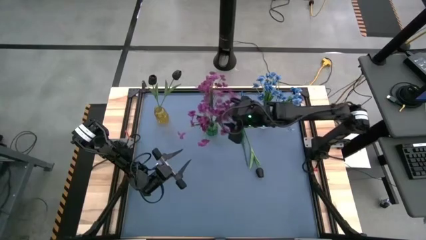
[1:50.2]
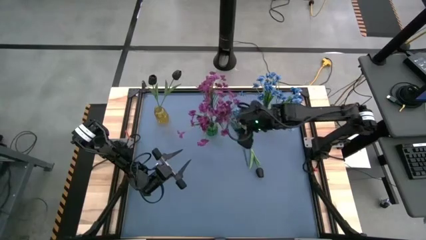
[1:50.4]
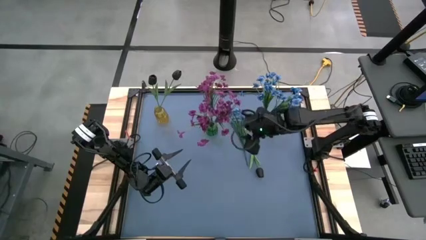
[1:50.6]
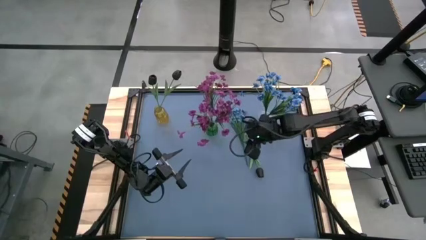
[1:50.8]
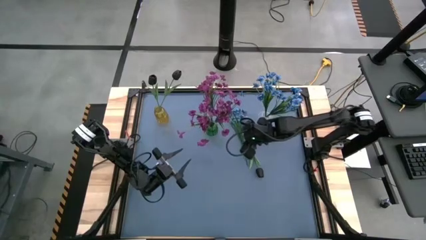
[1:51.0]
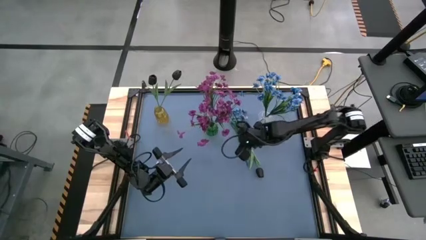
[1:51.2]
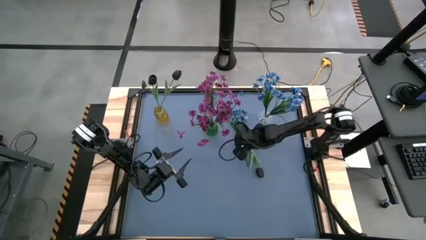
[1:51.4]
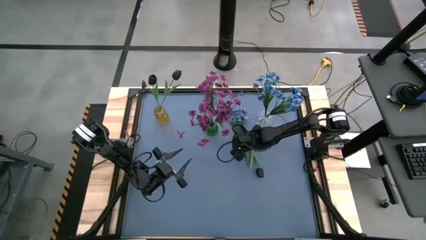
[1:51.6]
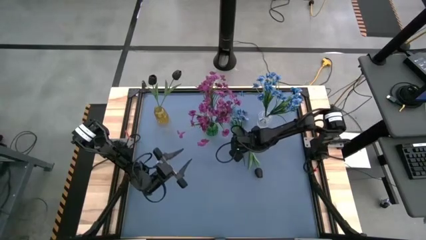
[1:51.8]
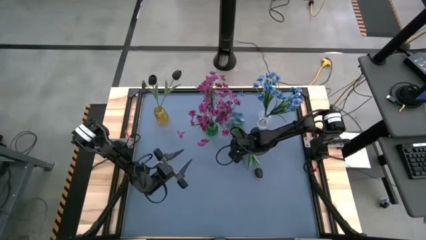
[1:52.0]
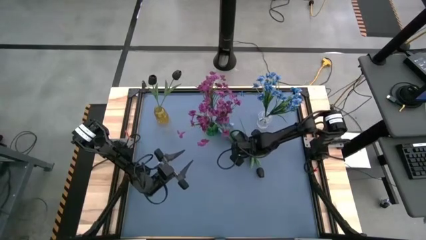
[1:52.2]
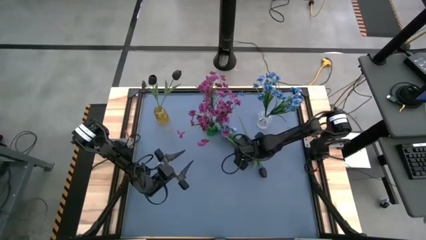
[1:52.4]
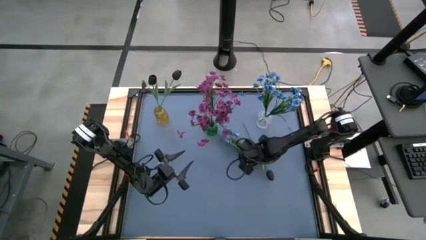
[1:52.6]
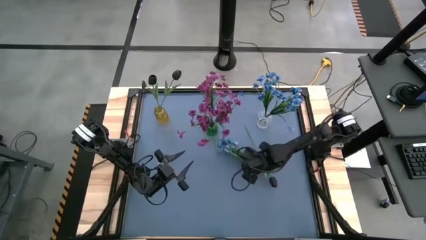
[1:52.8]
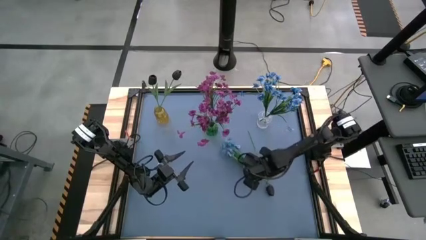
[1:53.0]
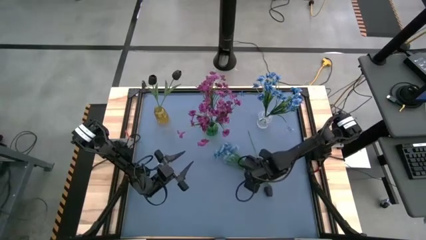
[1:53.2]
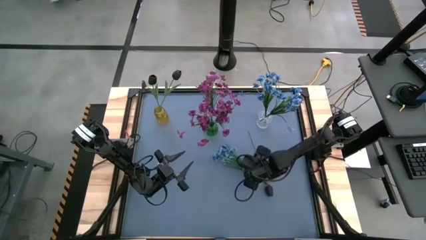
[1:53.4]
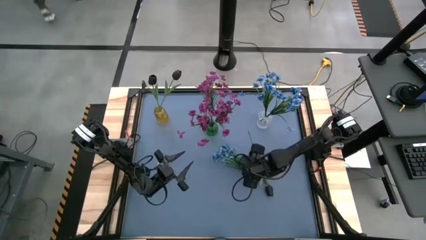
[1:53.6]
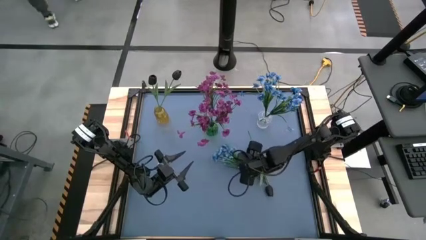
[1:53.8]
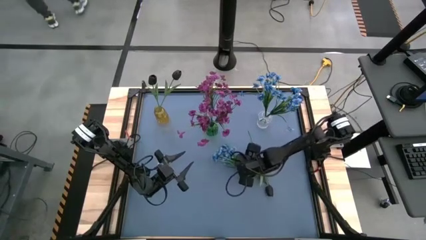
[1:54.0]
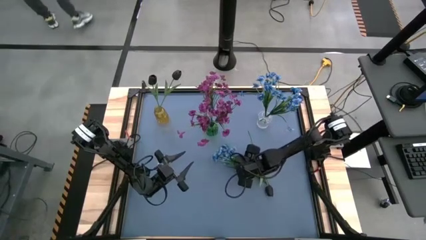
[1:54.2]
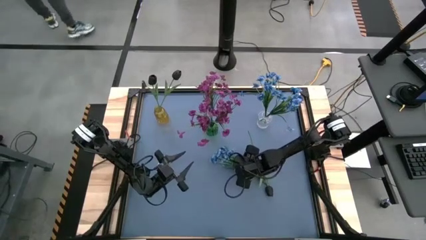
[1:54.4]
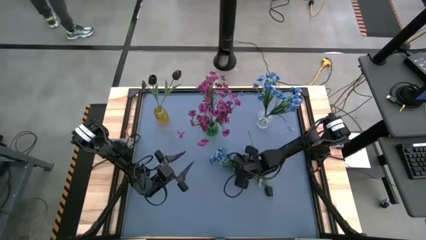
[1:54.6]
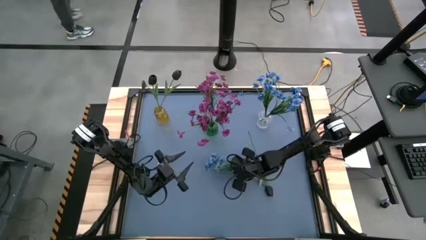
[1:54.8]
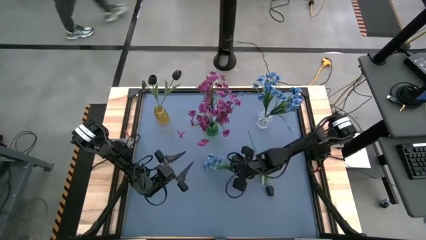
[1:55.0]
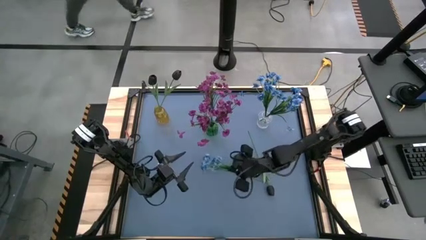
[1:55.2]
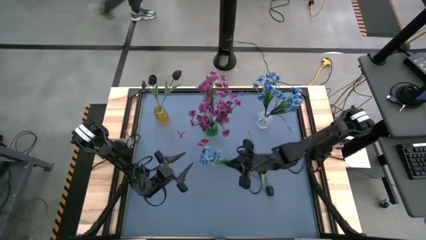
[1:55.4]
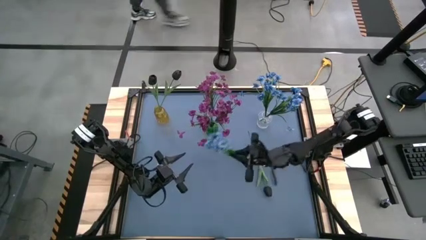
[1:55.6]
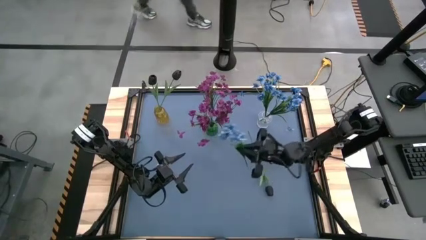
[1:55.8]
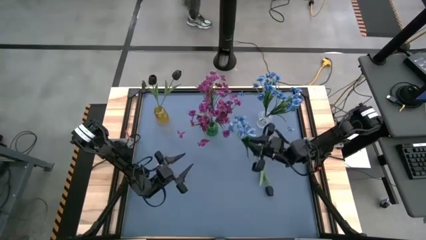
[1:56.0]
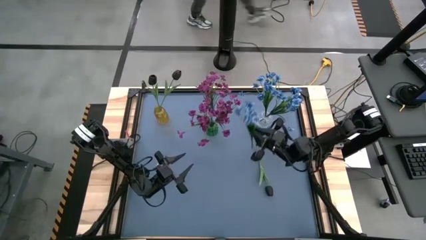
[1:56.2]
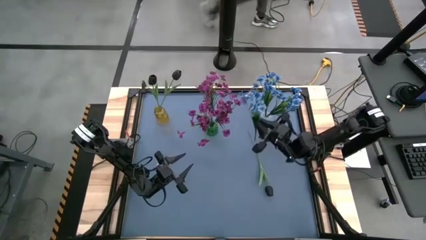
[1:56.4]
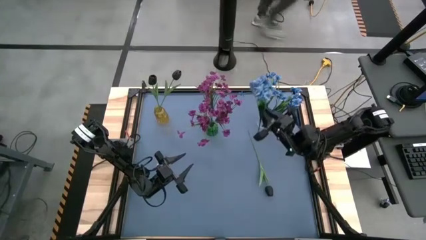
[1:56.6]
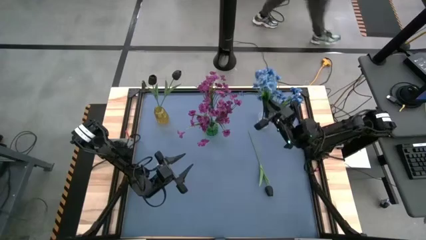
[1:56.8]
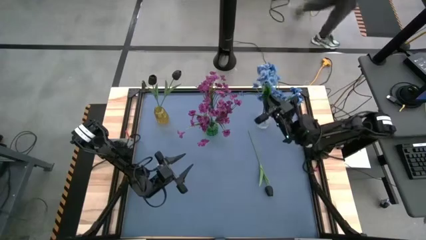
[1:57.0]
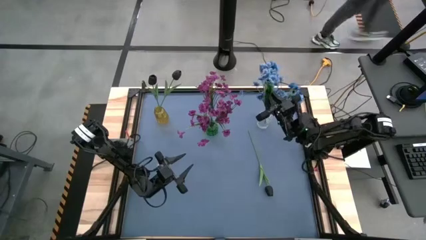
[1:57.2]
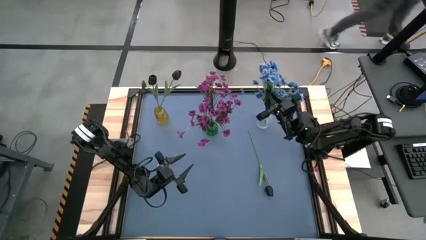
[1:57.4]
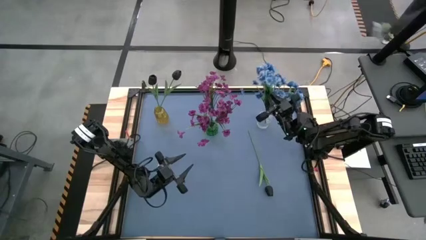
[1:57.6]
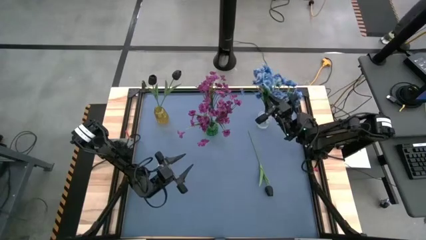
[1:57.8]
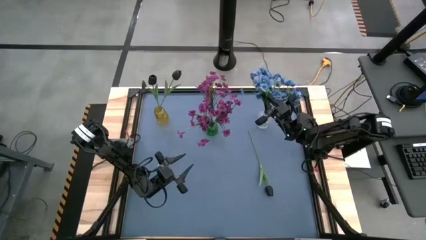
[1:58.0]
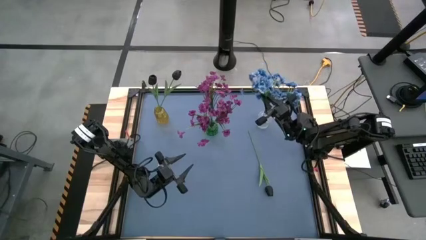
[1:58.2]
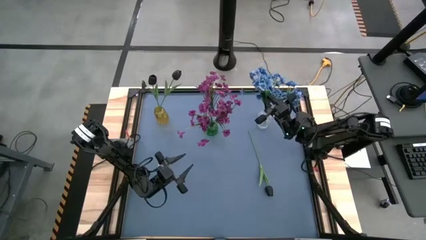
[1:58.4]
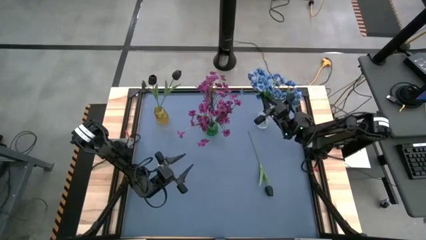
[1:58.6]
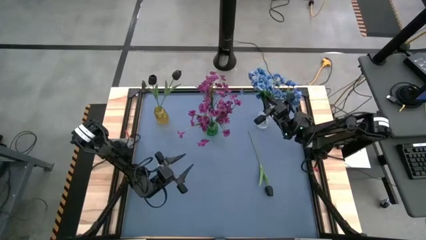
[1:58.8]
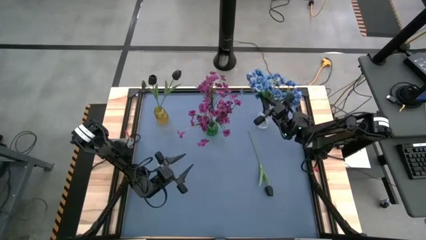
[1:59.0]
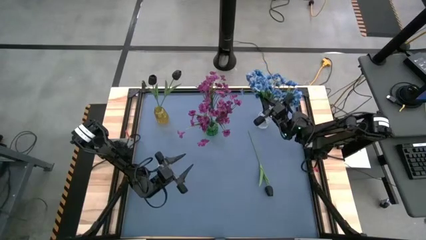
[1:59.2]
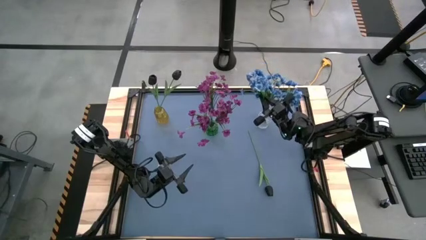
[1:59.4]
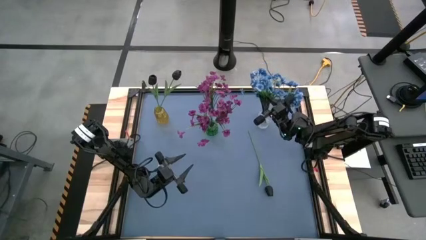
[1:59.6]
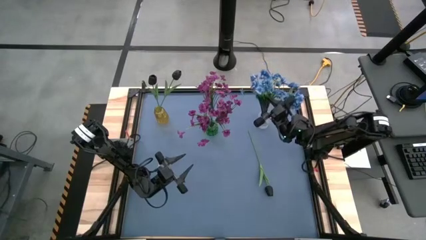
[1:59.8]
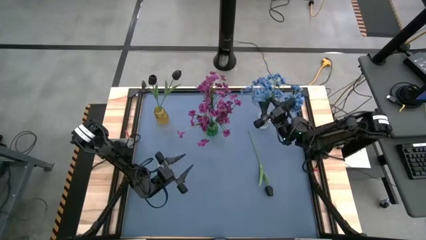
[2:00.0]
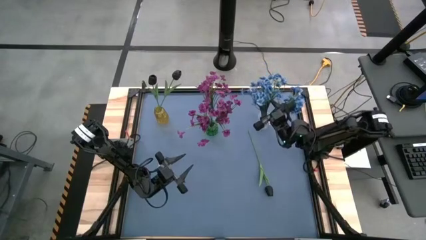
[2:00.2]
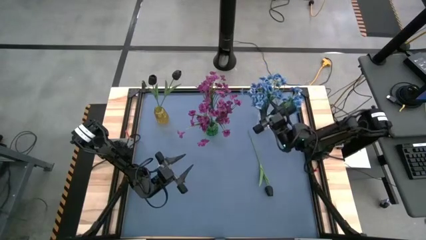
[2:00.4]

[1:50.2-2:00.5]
Task: Sort flowers into vase by color
Put the blue flowers into the transparent vase
